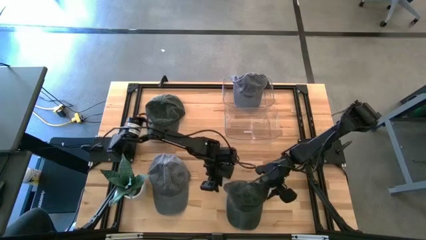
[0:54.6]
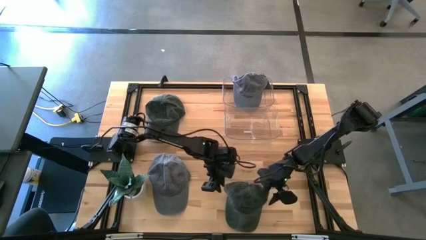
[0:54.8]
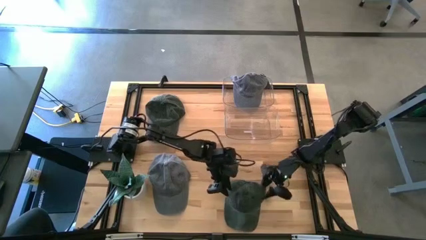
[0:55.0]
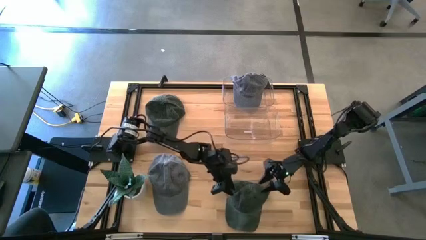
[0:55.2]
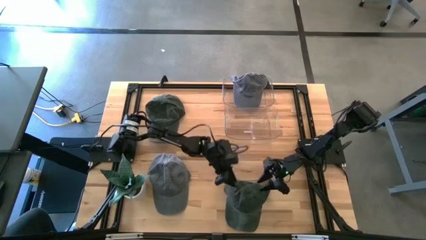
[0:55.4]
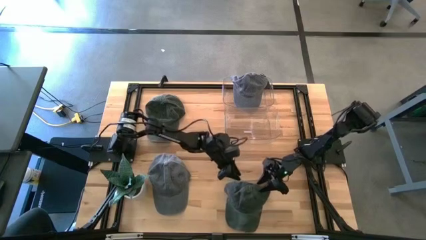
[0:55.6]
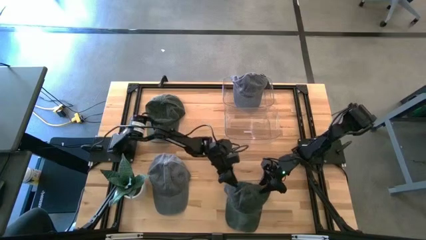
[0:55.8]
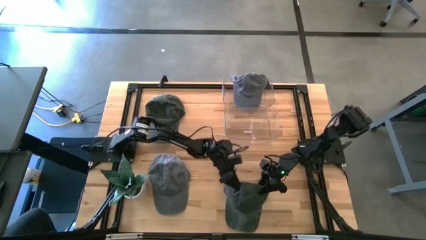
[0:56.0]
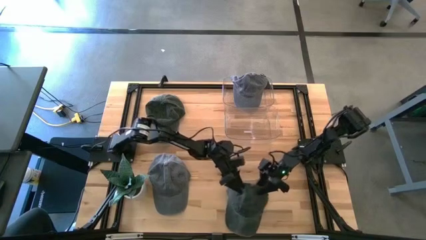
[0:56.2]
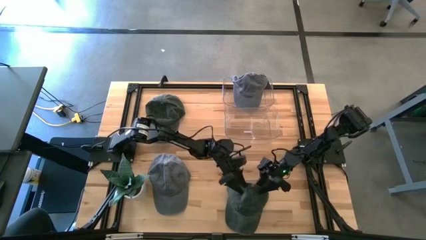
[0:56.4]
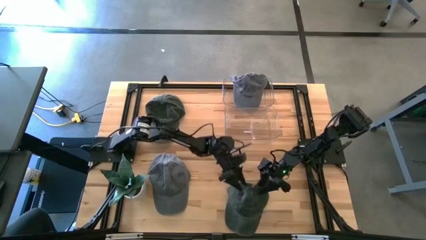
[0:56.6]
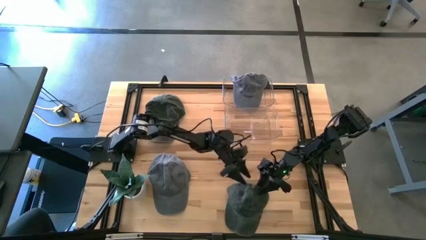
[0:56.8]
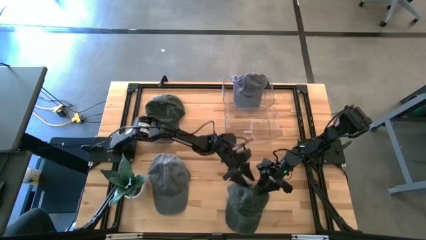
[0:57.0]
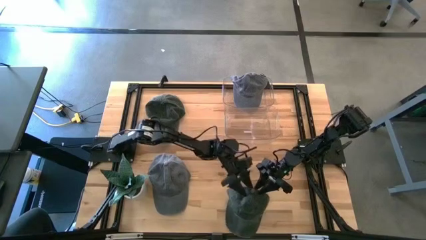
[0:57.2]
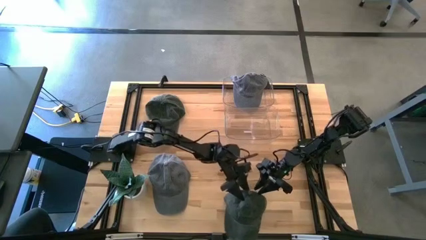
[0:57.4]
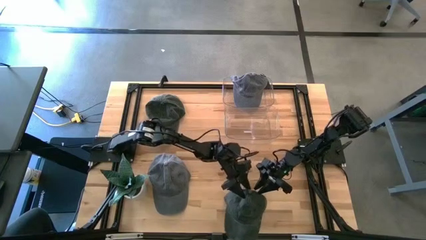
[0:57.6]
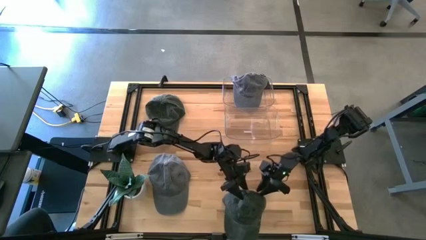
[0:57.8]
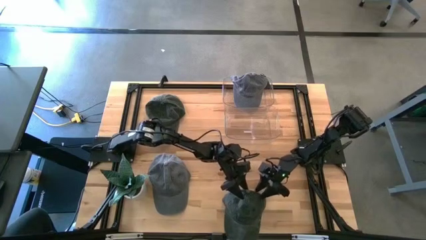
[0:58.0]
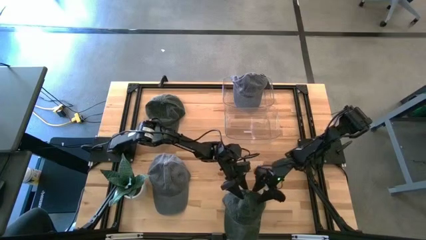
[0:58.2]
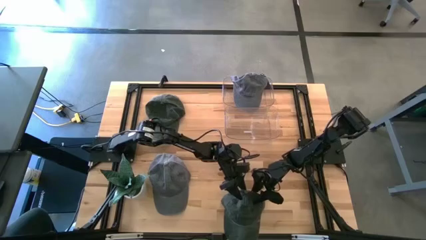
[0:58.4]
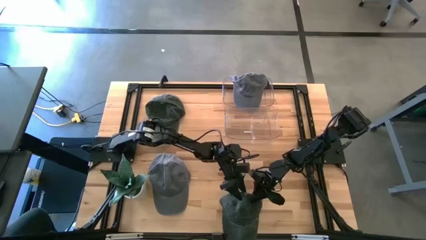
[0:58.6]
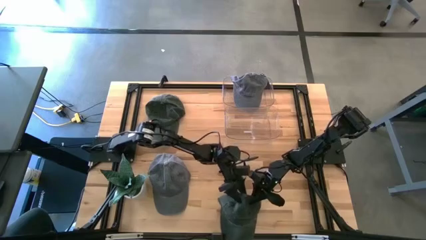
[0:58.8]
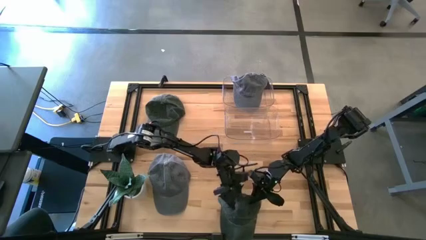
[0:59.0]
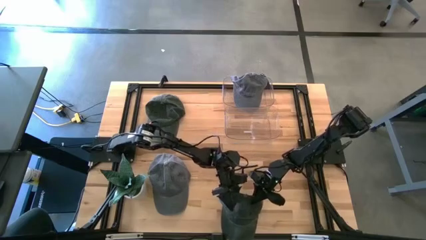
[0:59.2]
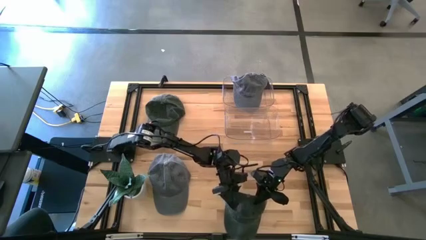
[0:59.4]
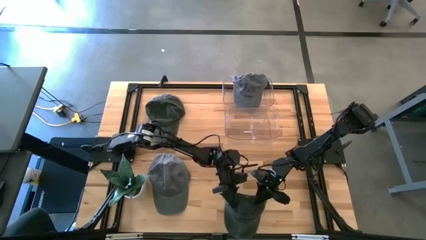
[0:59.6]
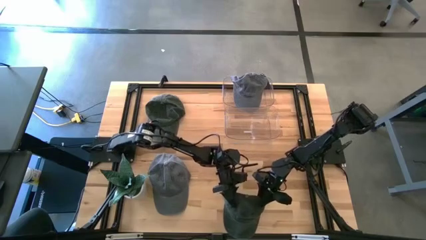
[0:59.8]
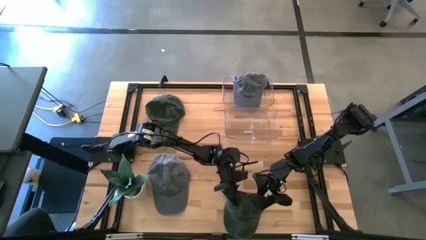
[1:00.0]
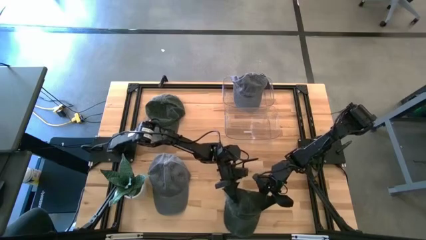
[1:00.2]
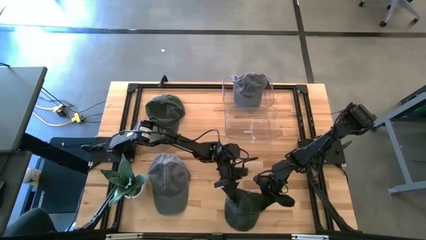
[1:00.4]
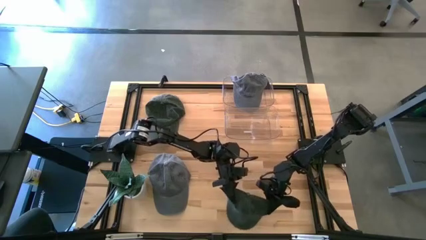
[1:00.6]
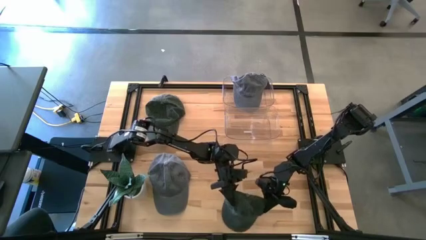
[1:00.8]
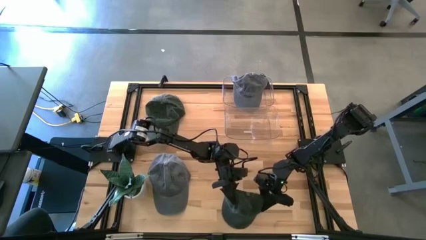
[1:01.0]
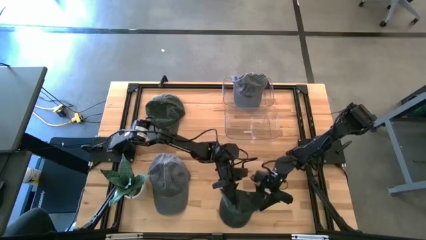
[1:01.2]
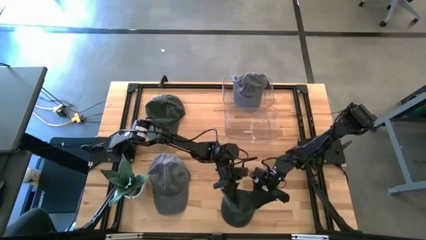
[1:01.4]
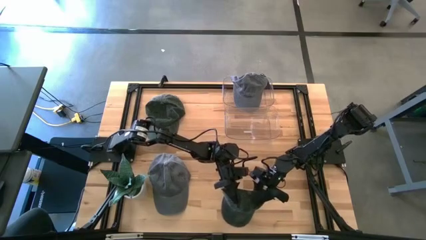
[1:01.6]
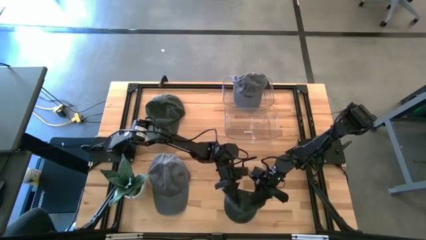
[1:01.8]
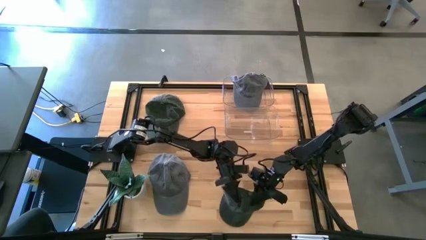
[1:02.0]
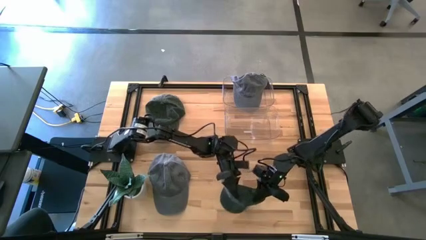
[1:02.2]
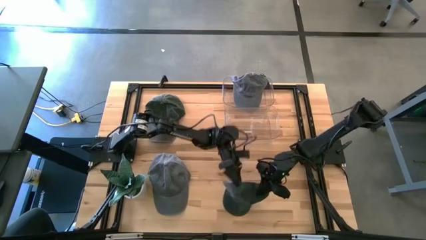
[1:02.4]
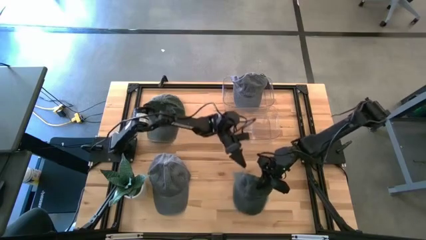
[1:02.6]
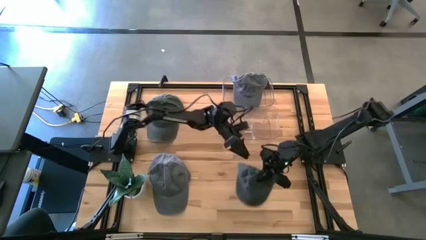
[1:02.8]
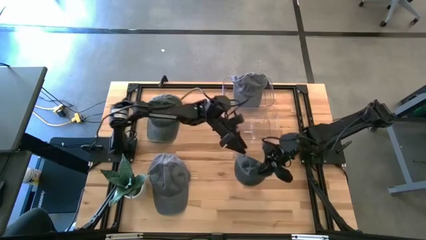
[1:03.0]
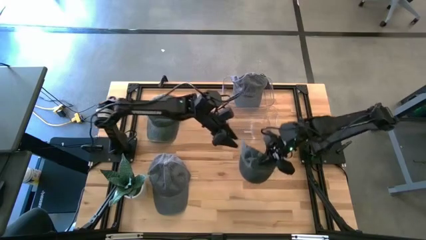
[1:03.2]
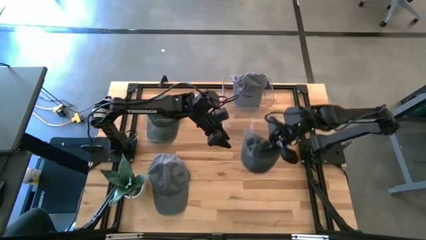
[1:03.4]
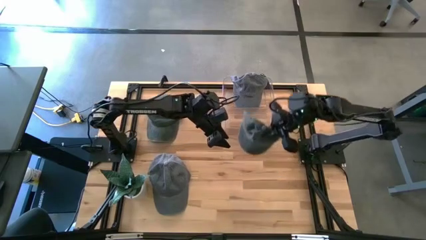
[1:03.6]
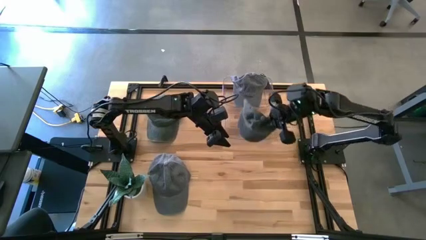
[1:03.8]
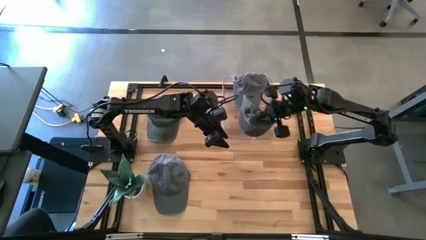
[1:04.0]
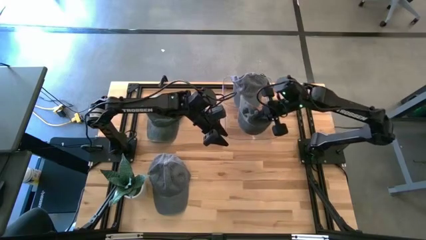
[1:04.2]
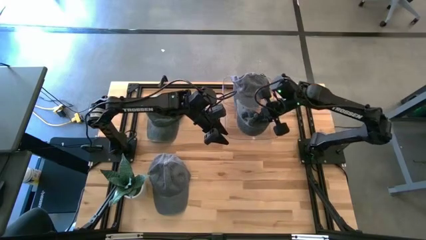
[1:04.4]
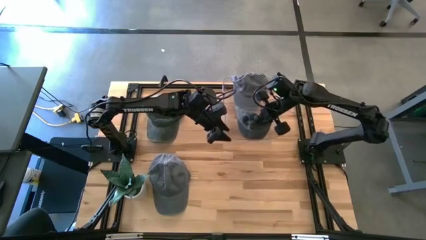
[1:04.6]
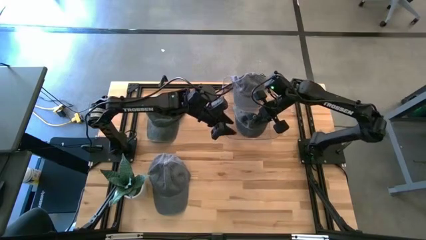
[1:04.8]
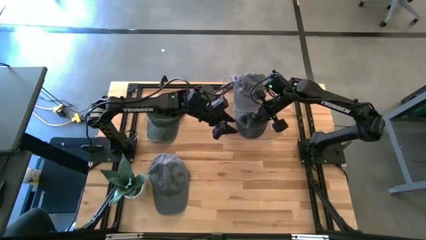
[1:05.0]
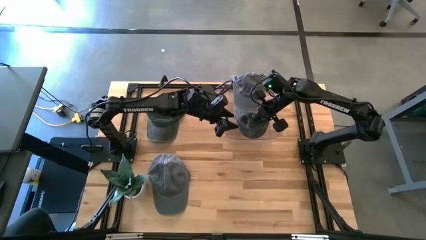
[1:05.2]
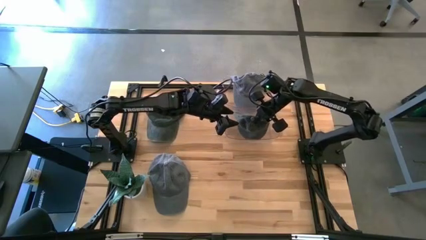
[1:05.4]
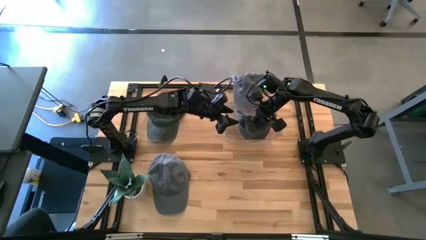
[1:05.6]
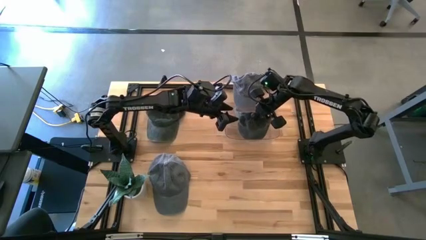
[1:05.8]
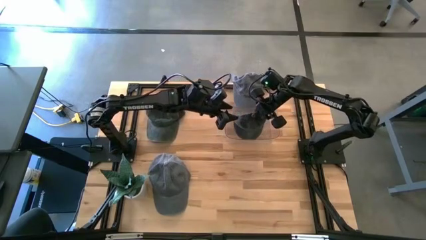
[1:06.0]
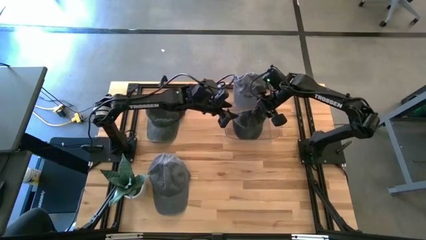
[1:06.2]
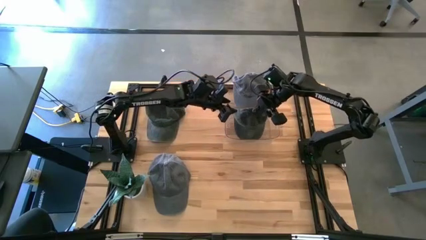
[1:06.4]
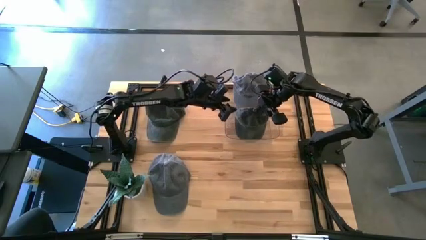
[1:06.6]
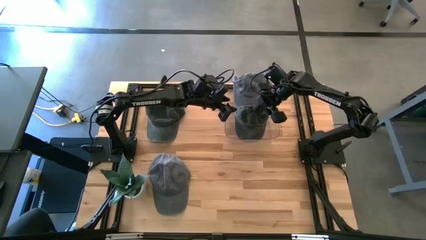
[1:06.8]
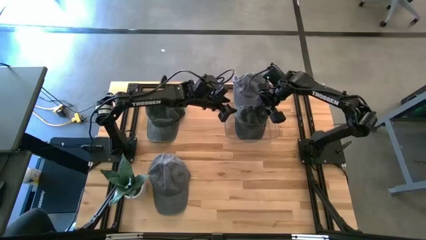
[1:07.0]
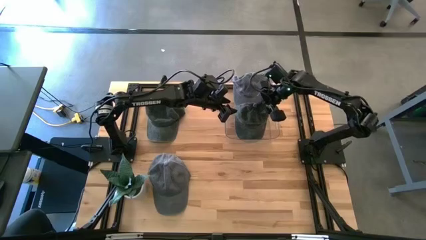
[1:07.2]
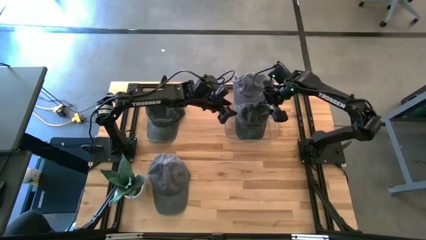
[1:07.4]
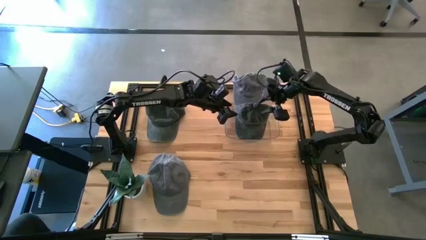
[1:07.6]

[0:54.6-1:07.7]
Task: Pick & Place hat
Put the bottom black cap into the bottom transparent bin

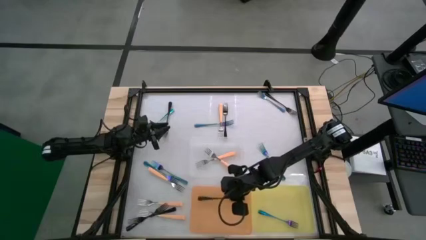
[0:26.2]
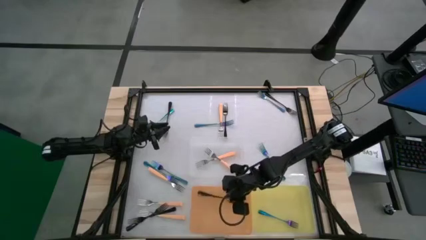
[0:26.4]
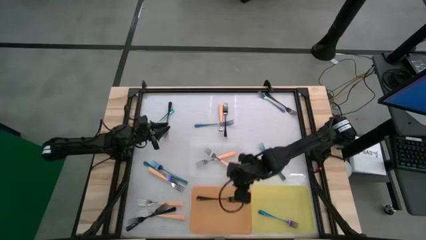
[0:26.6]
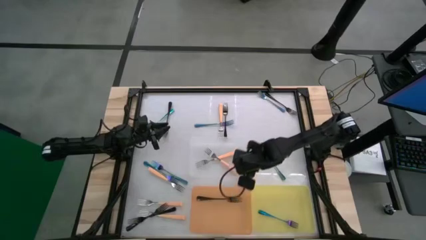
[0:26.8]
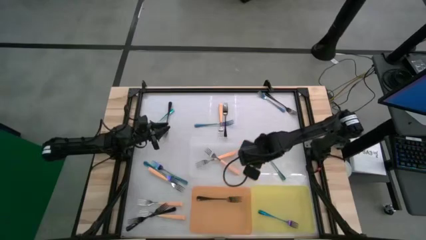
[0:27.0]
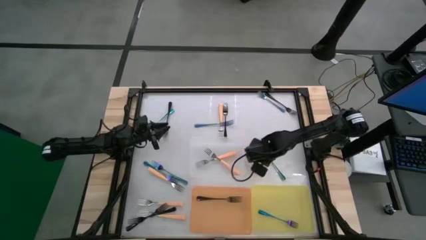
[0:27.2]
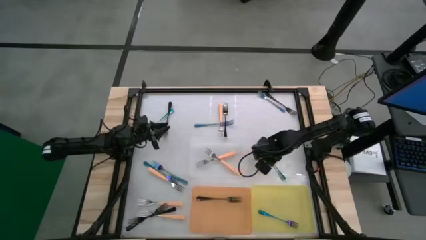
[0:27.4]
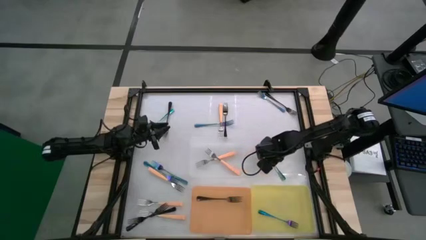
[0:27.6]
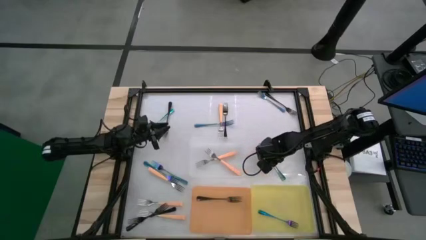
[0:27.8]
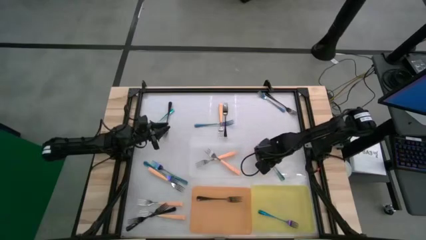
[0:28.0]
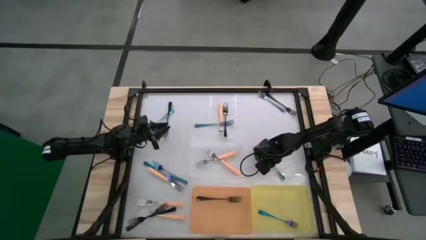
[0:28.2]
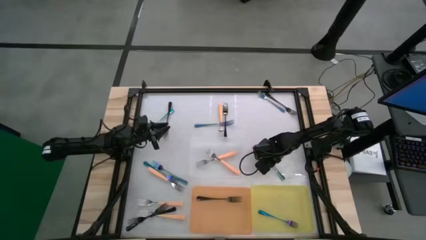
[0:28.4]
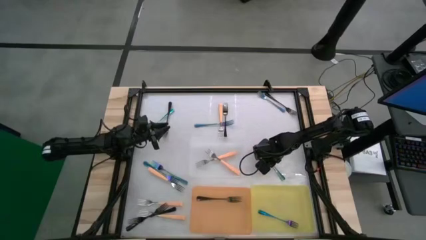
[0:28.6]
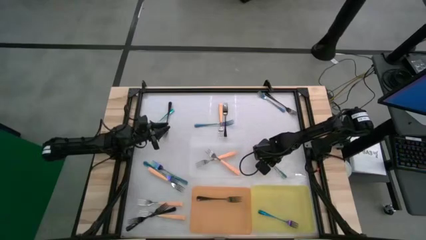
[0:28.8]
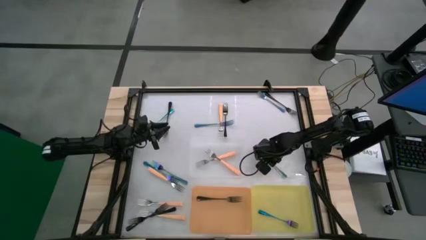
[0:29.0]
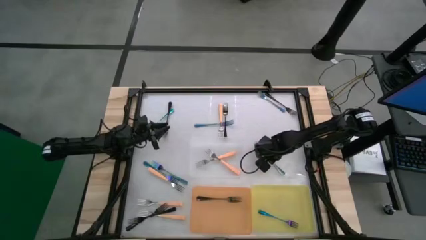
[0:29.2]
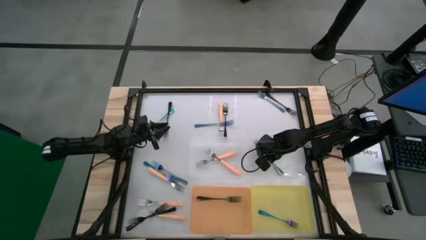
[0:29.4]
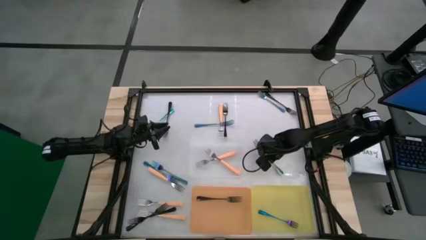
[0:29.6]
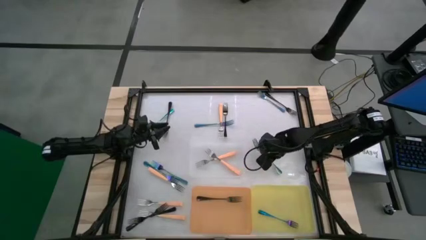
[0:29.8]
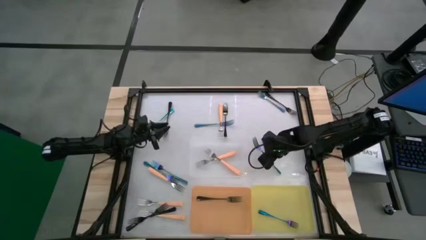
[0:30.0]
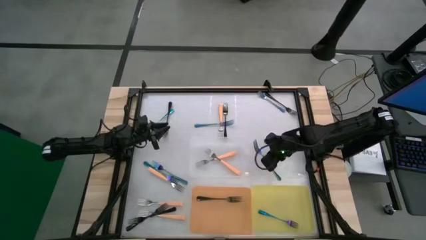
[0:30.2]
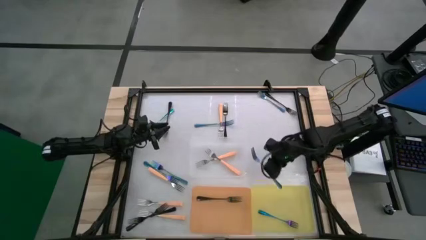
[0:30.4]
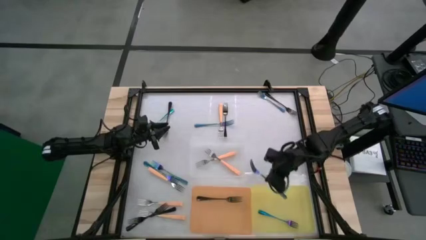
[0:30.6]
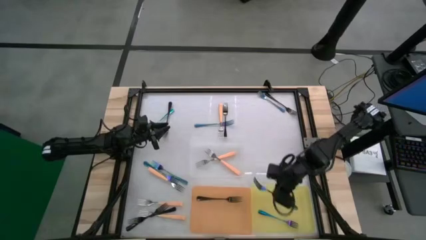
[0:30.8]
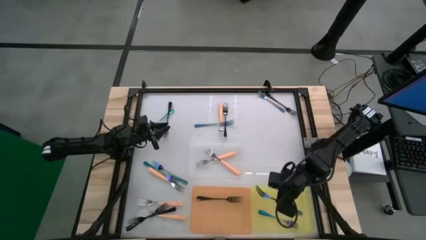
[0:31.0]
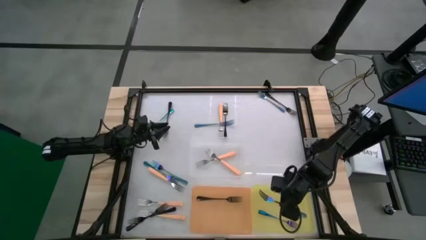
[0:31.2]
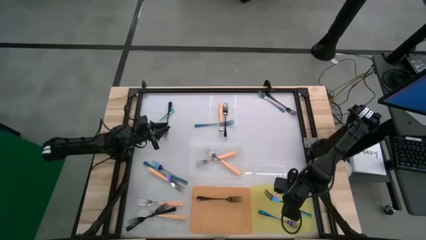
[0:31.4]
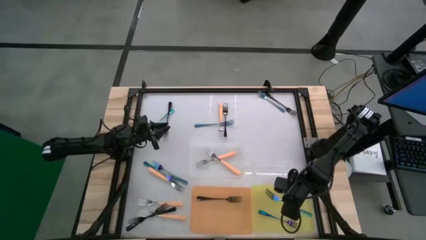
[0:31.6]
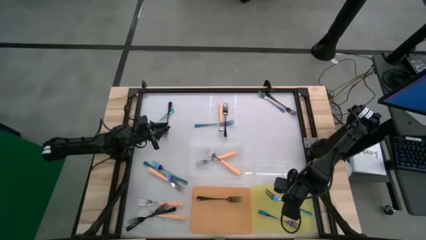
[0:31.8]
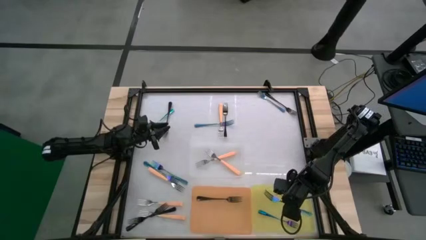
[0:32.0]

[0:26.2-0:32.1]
Task: Sort silverware by color (type)
Put the blue fork into the yellow bin
